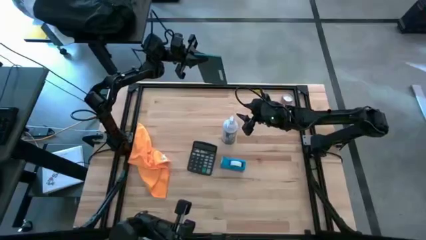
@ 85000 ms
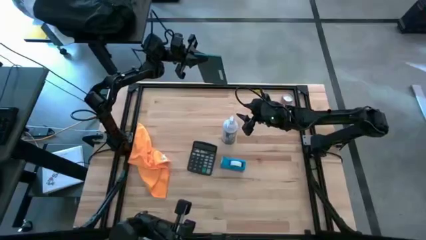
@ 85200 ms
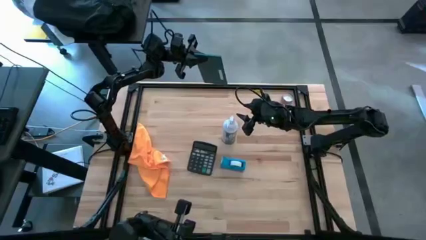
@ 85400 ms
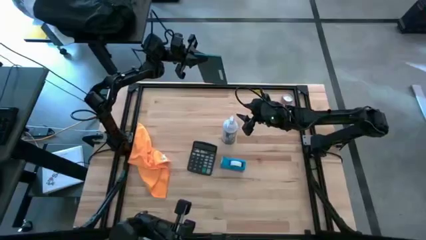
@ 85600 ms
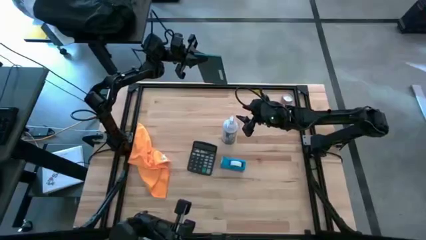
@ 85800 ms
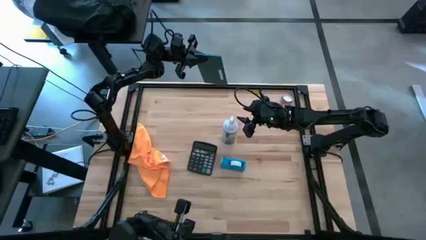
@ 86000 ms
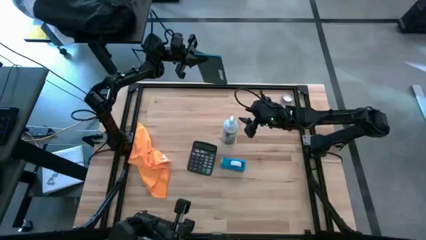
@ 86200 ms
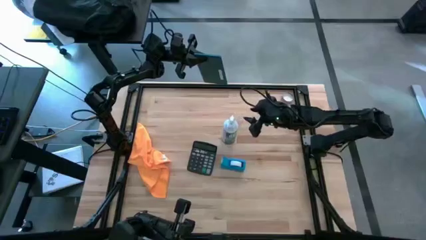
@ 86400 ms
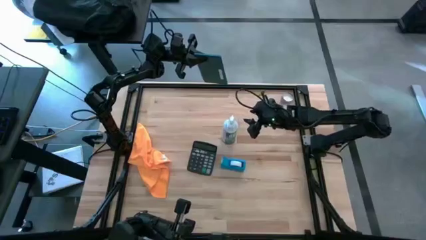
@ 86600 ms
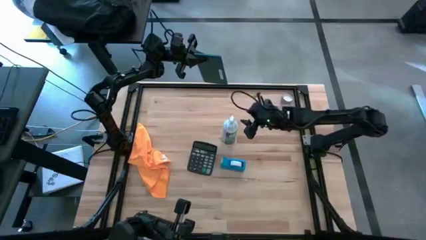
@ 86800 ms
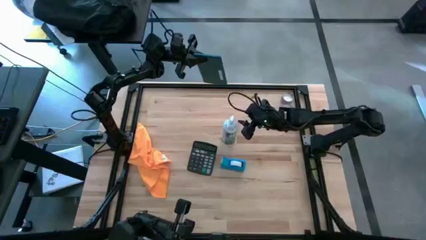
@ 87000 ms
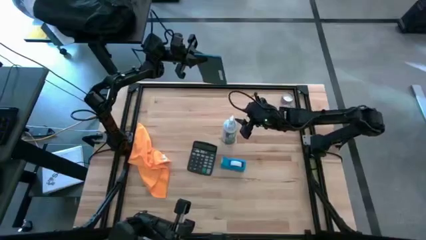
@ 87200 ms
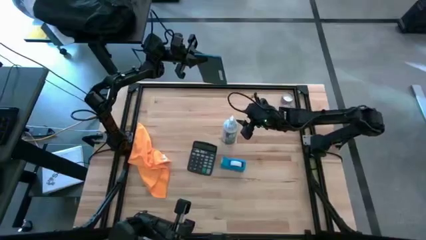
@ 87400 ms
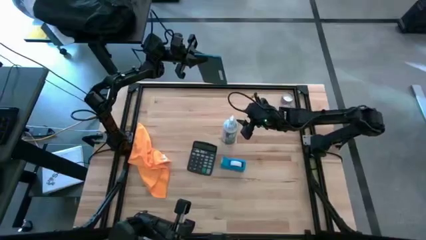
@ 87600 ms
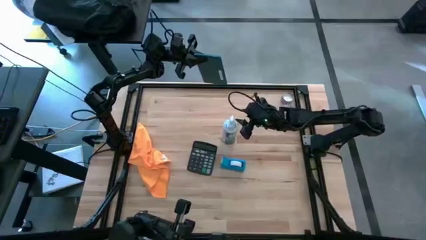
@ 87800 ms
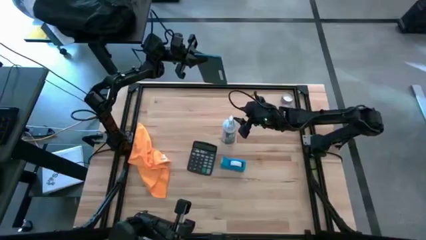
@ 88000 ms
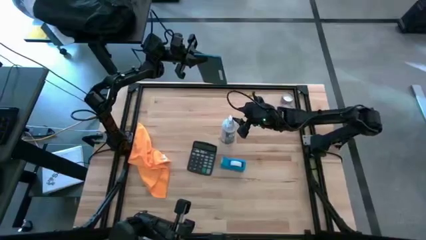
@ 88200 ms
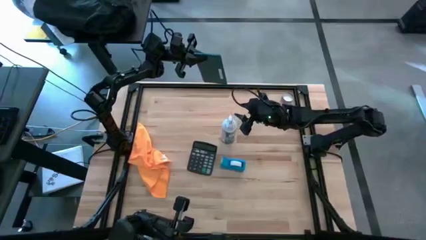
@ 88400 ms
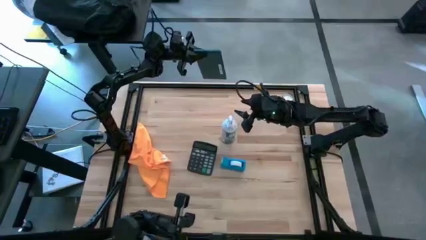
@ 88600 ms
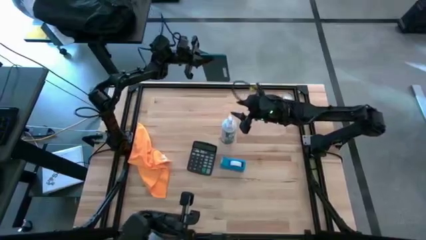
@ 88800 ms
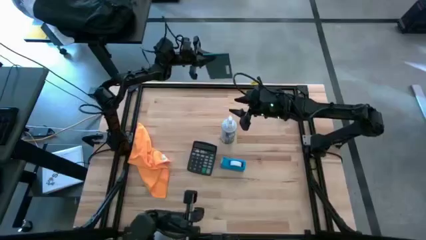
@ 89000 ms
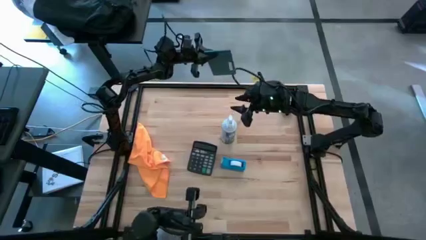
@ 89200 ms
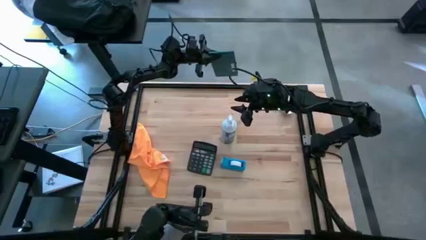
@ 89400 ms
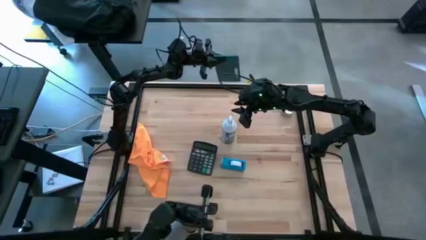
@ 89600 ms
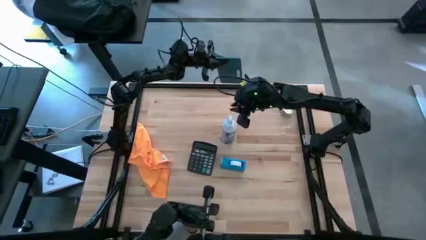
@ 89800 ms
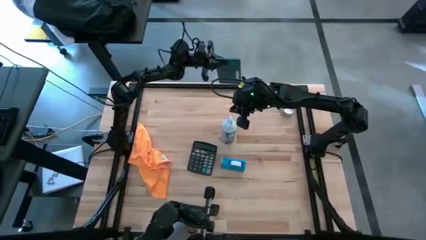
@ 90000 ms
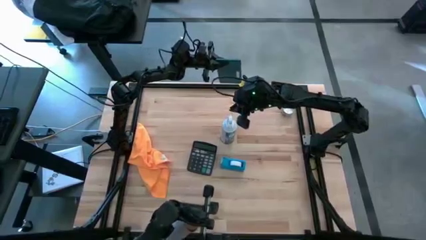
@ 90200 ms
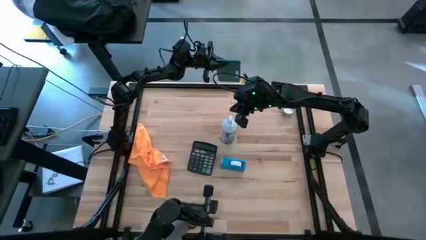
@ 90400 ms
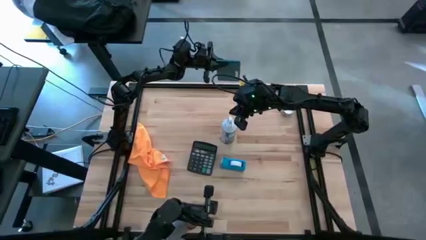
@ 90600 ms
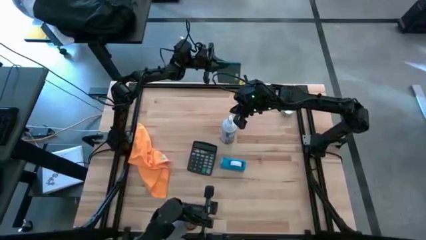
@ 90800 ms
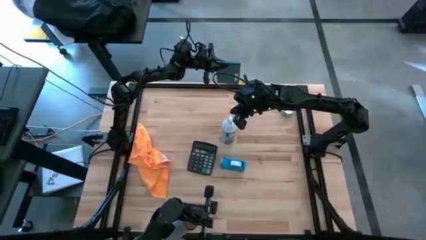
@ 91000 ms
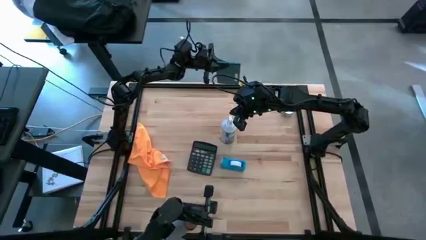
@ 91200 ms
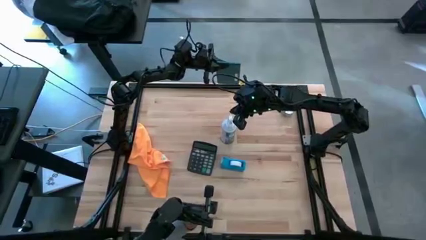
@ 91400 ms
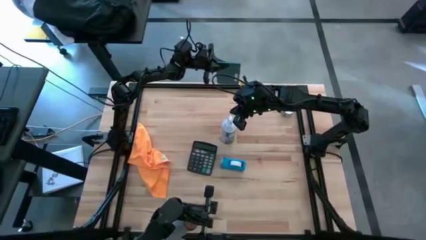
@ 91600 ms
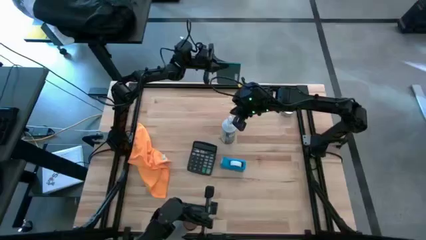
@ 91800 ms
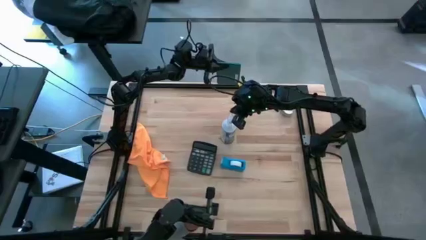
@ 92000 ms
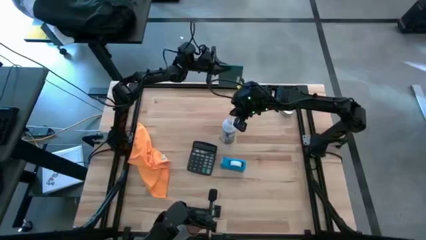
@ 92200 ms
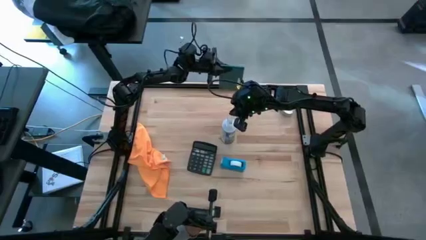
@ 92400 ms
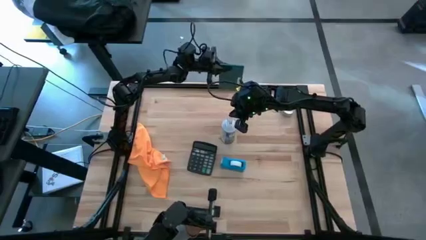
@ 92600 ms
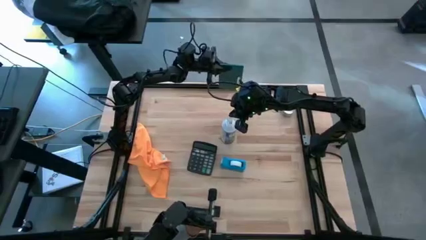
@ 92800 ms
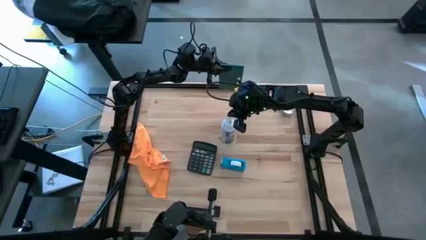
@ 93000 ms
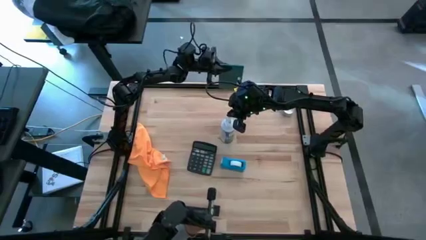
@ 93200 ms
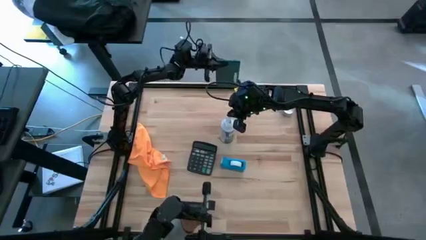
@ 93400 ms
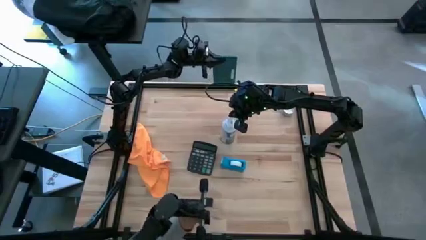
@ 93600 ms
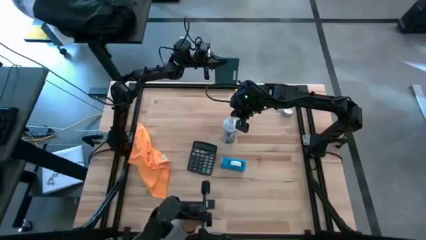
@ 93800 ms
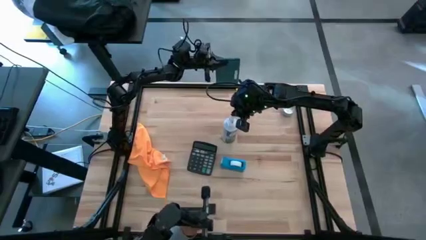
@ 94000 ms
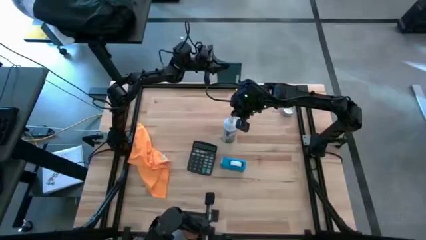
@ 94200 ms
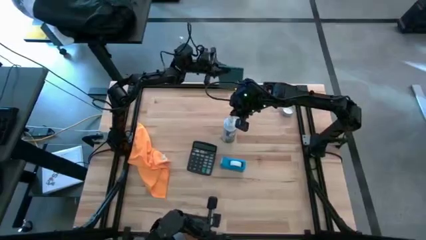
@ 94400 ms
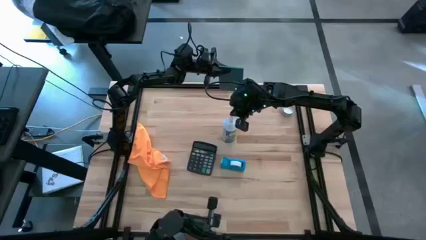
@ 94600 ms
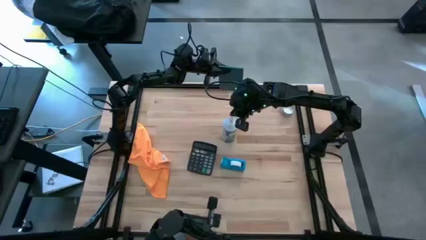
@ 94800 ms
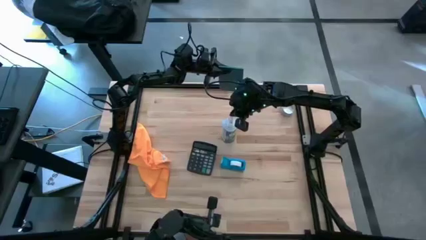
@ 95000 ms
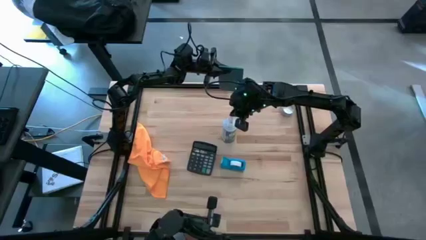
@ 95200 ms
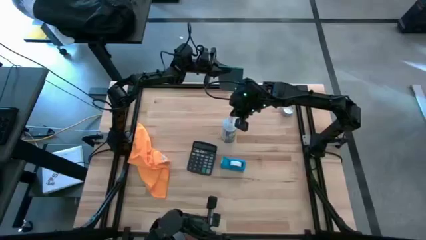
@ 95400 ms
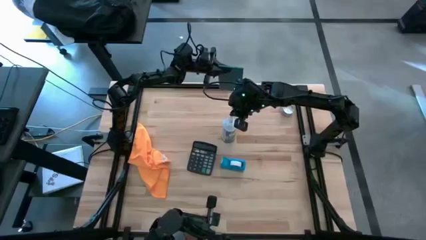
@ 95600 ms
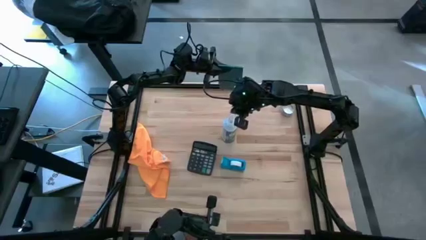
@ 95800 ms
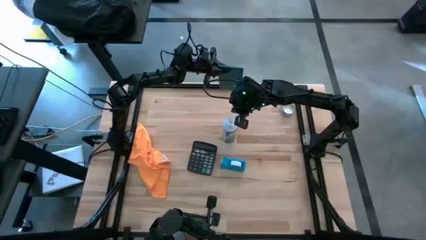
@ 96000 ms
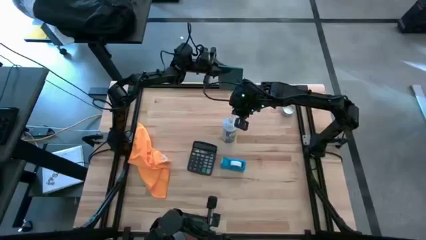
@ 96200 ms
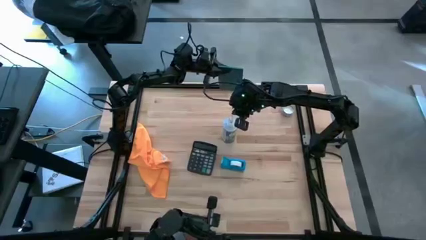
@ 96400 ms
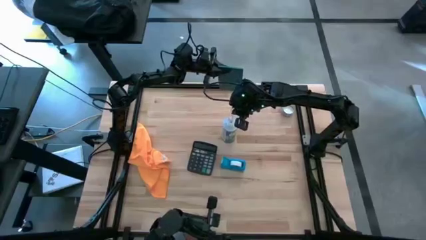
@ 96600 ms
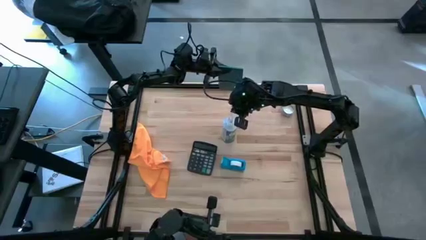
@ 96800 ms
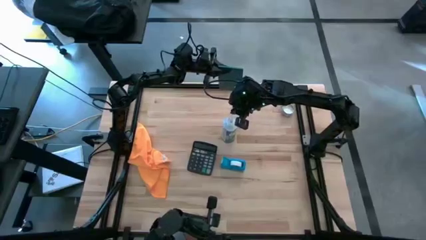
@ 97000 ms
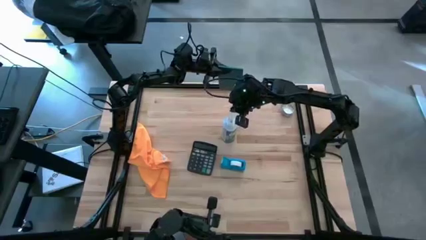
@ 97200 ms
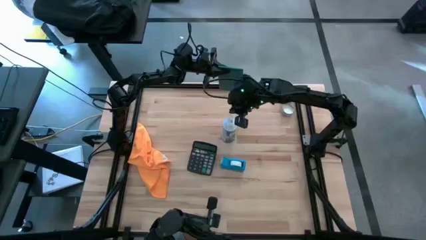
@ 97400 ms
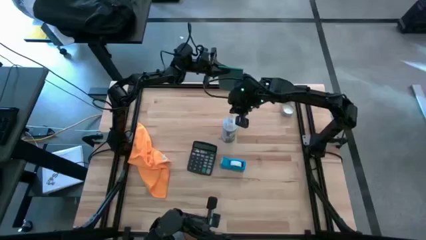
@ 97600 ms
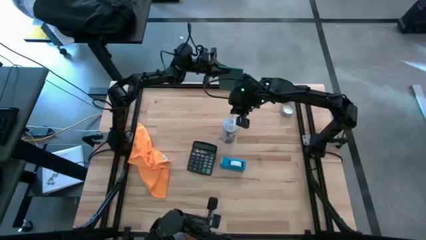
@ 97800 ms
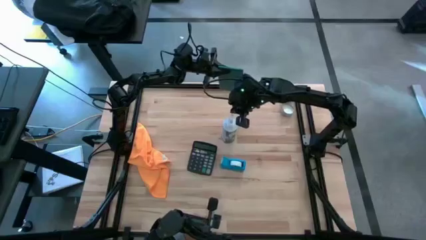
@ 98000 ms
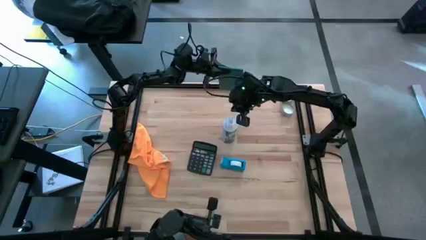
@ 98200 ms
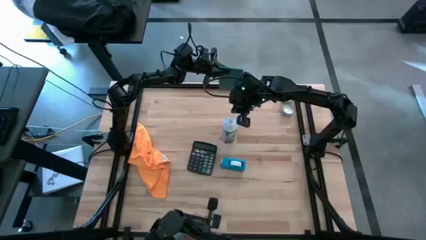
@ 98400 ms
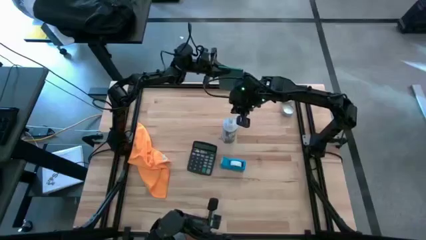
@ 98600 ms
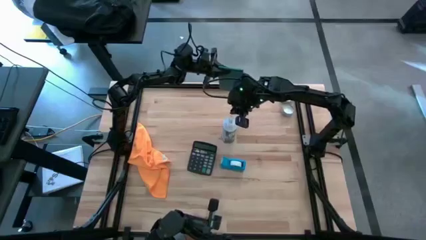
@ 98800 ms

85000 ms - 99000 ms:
Task: Apply microfiber cloth
Spray the back of the cellphone with spray bottle
